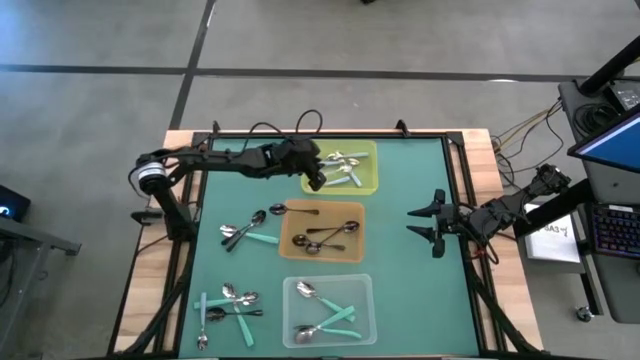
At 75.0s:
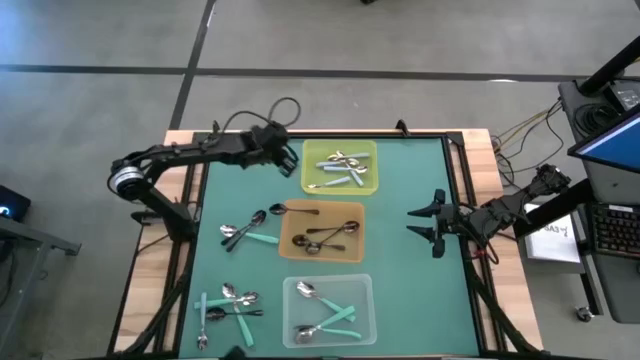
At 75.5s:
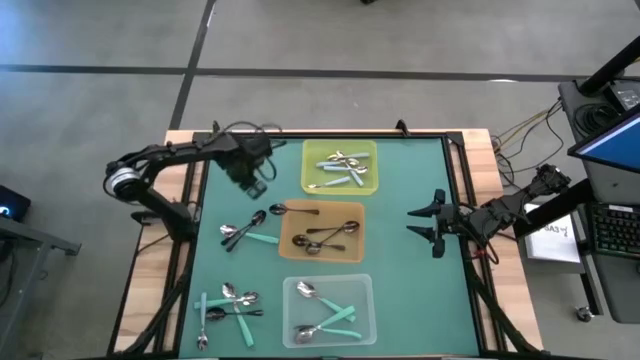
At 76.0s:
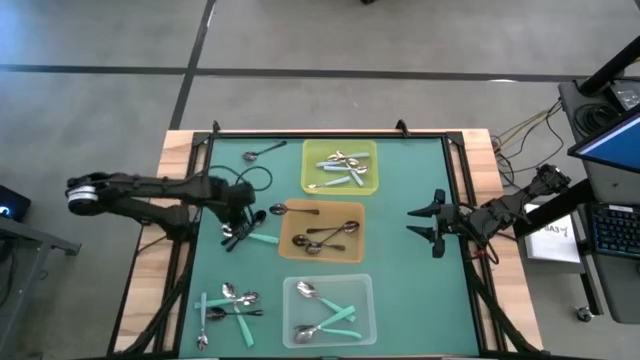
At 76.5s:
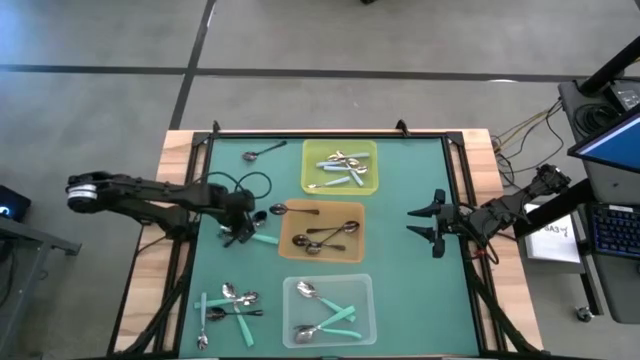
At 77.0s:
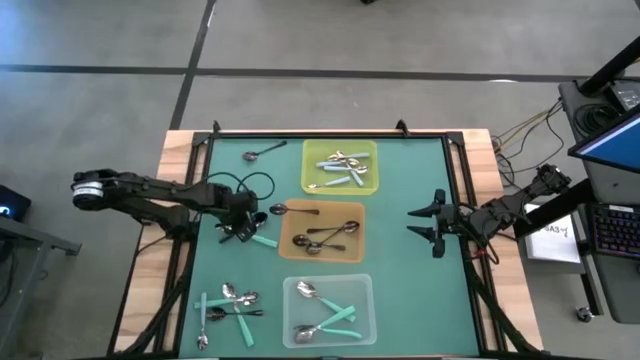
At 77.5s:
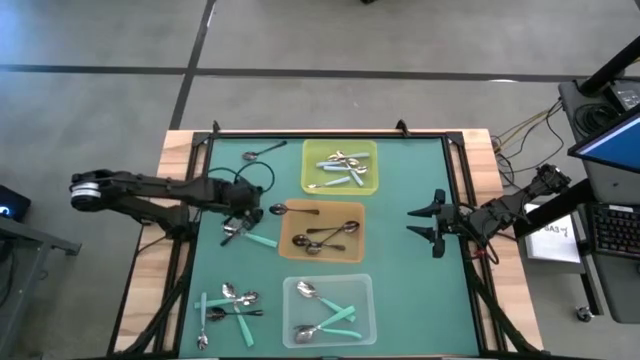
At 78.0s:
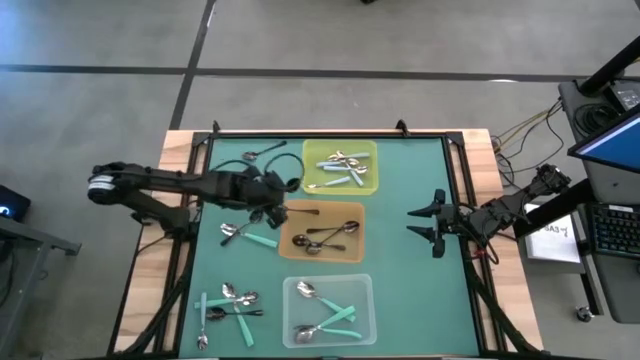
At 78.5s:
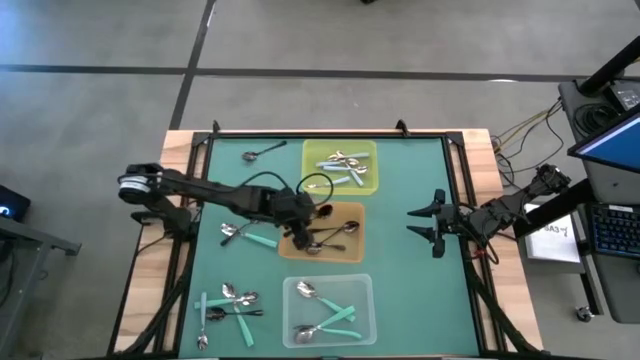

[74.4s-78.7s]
Task: Sort silverware by color (type)
Put the black spoon into the orange bin

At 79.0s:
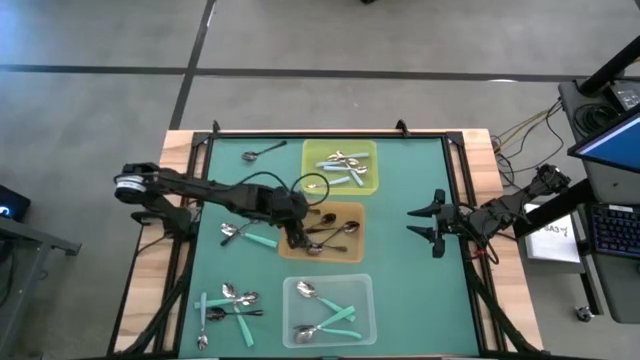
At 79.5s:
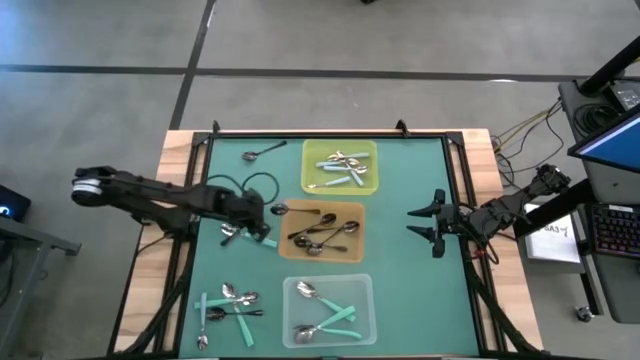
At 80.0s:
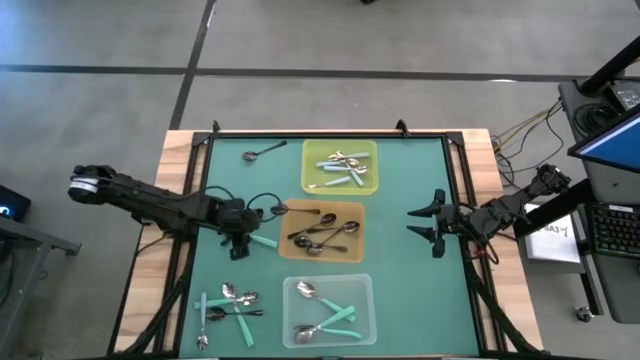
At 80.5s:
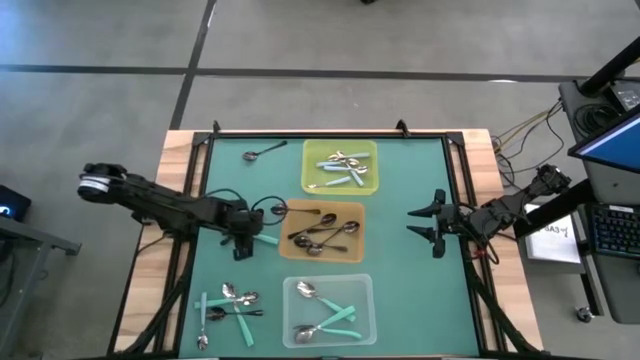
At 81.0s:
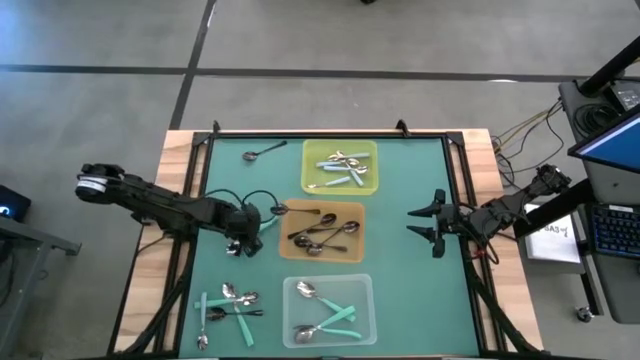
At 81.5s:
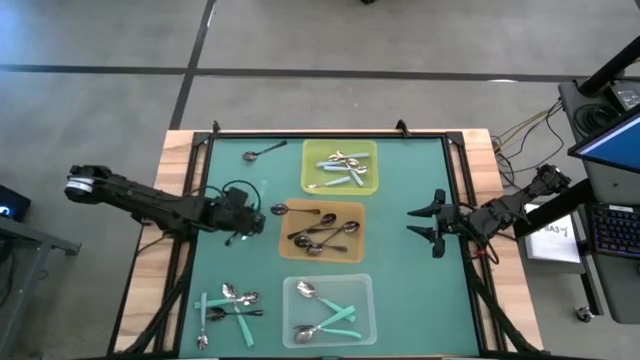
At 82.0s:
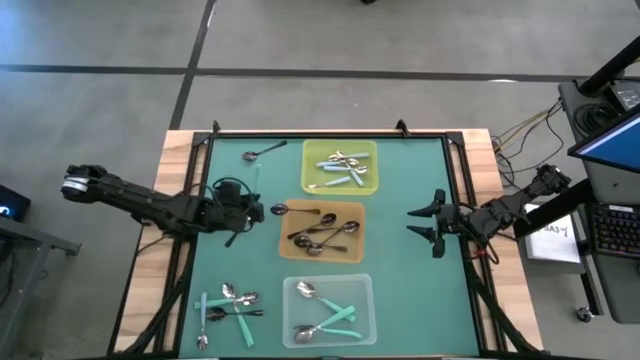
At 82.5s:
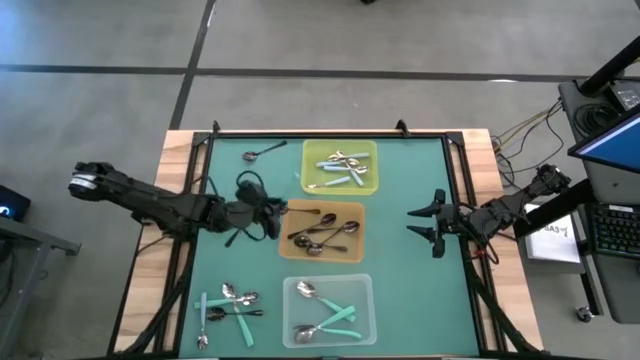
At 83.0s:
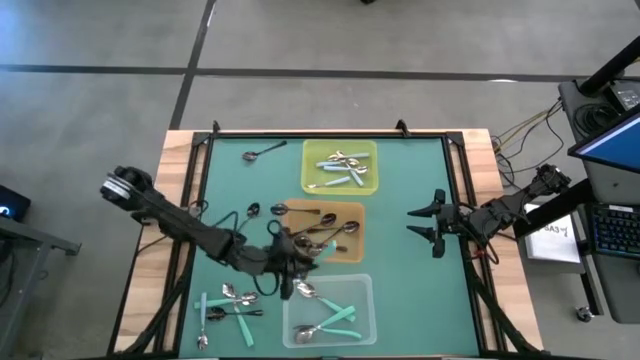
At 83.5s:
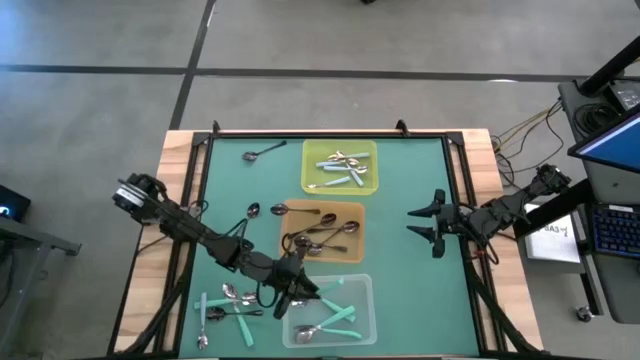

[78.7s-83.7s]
Put the green spoon into the transparent bin

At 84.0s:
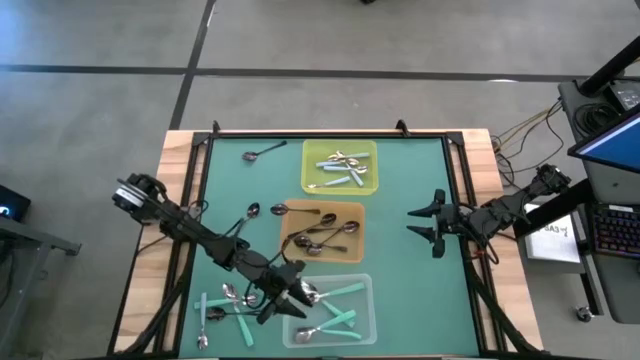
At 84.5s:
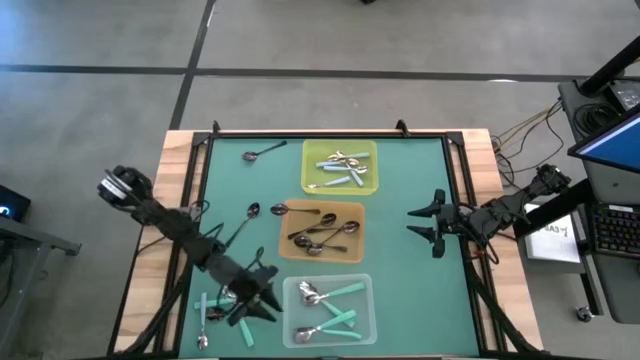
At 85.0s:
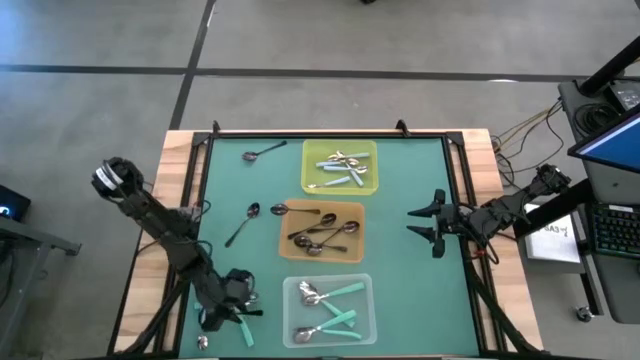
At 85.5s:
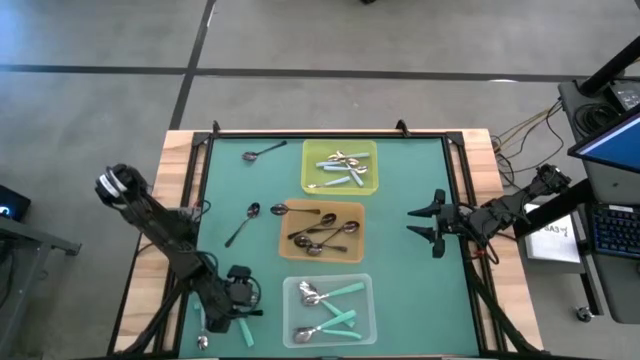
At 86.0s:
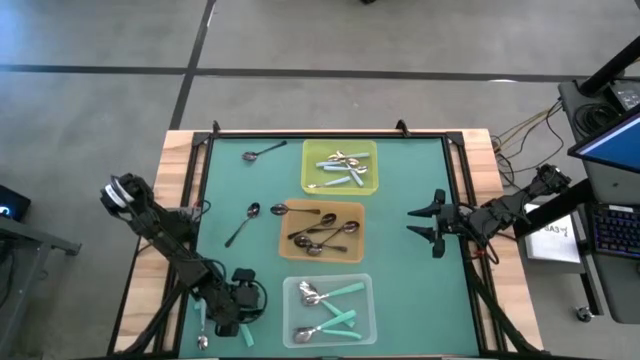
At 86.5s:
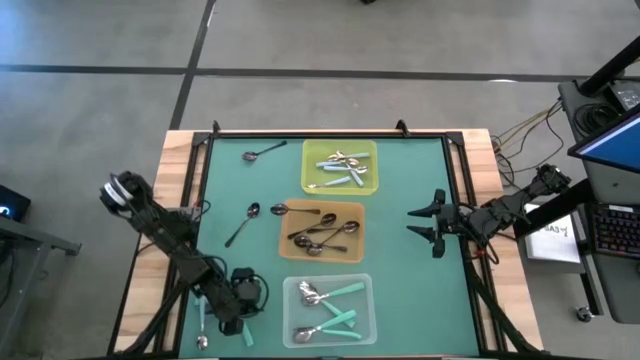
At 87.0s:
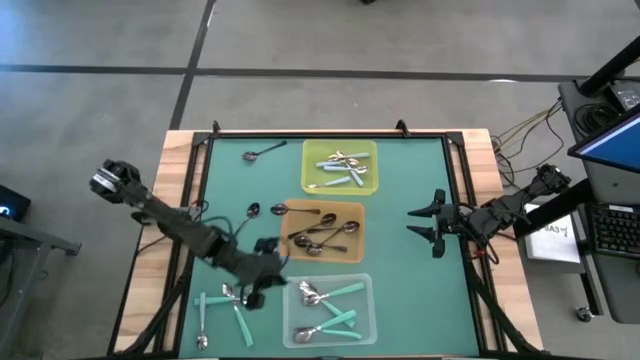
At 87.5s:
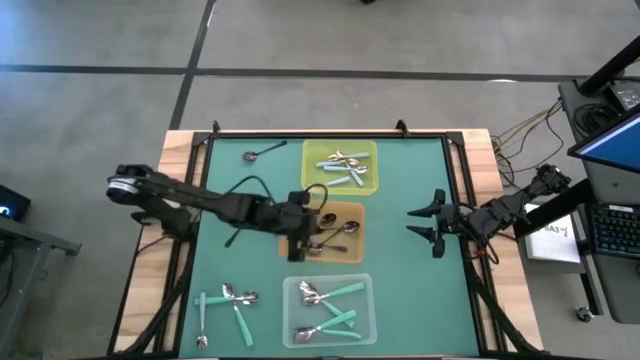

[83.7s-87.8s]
Put the black spoon into the orange bin

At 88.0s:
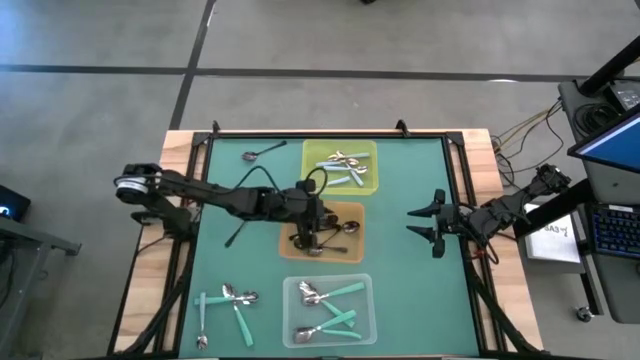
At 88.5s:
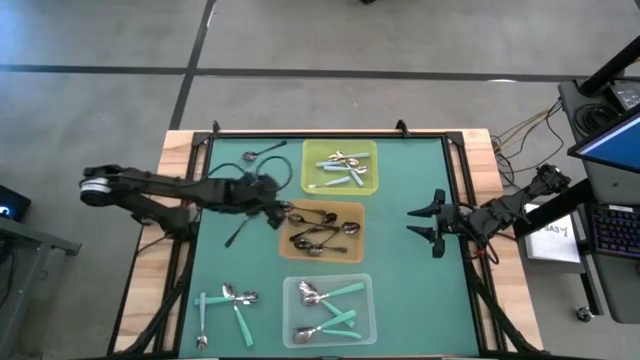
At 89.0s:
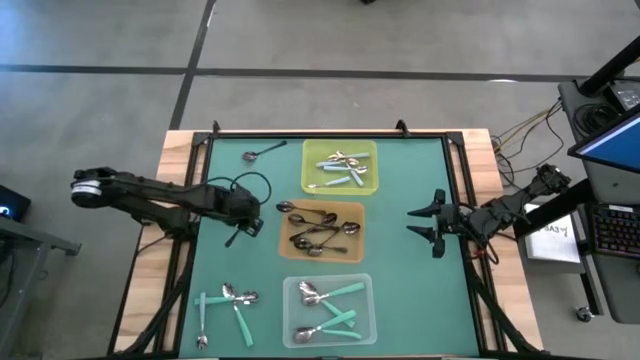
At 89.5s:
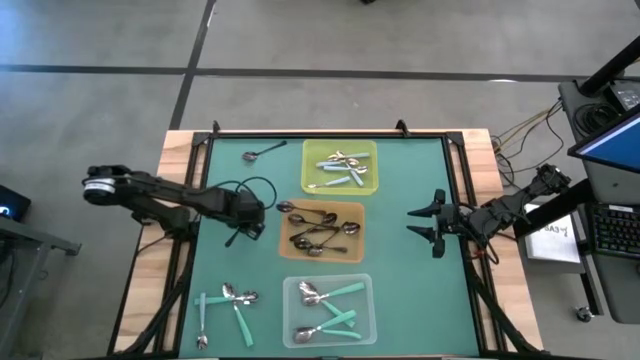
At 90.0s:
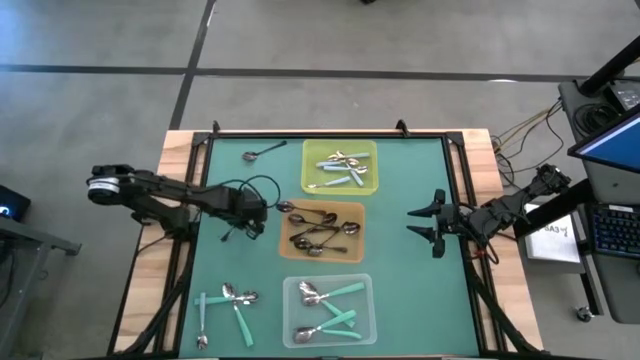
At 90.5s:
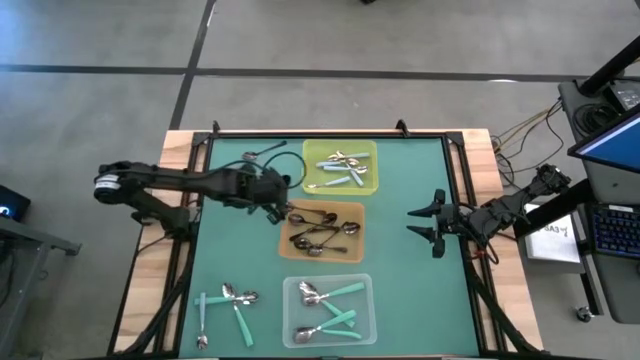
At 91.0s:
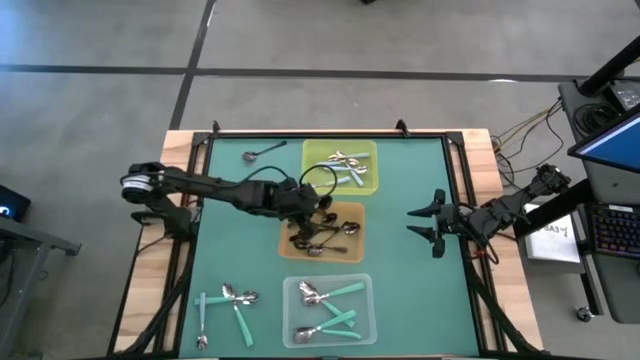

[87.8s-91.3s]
Put the black spoon into the orange bin

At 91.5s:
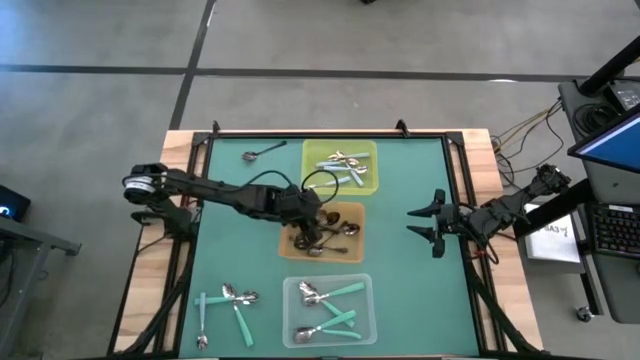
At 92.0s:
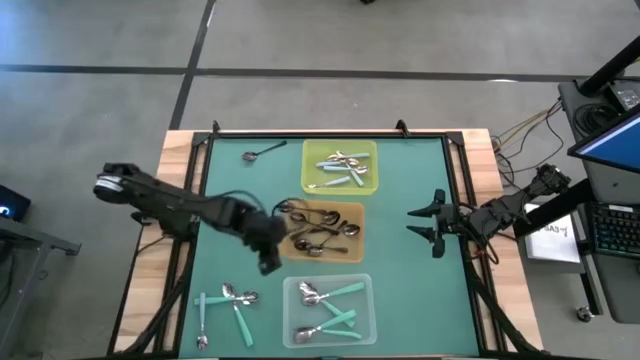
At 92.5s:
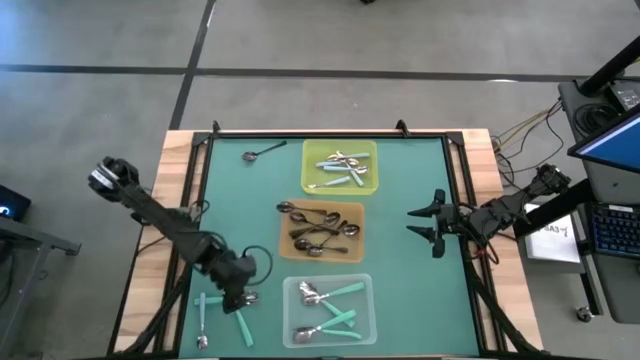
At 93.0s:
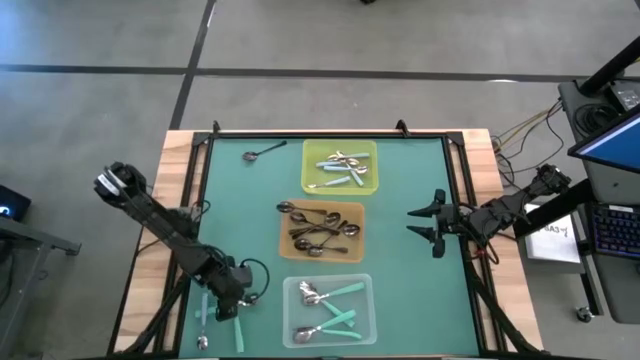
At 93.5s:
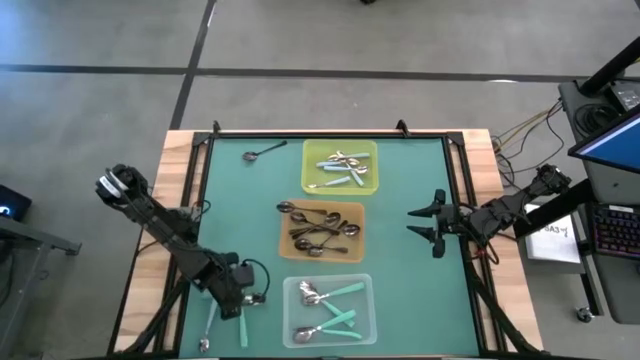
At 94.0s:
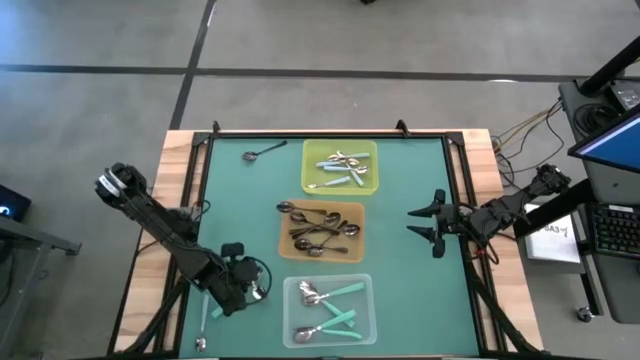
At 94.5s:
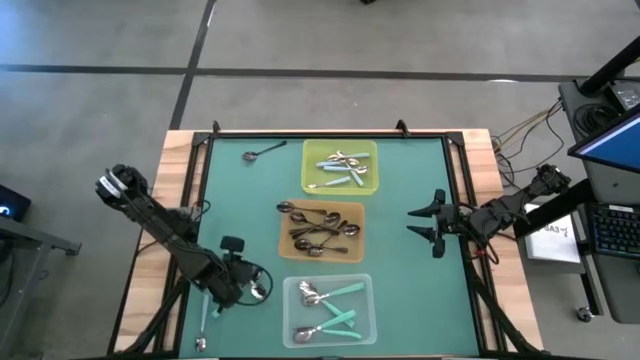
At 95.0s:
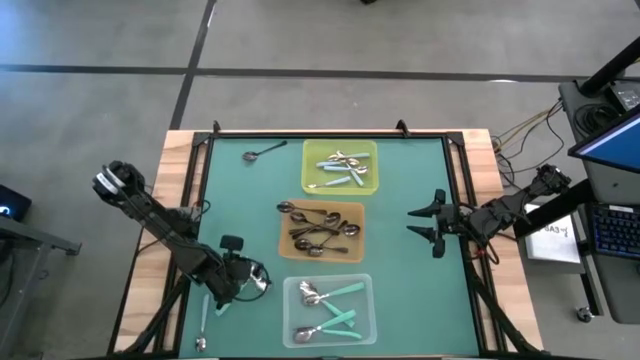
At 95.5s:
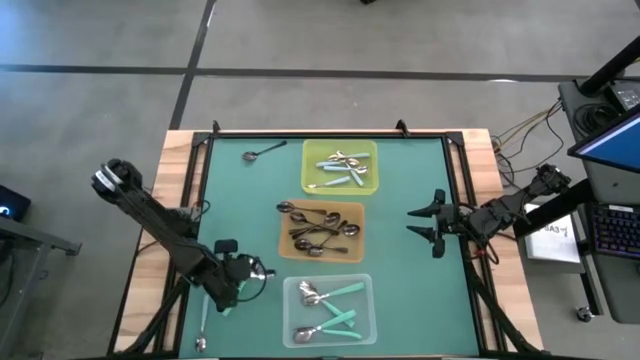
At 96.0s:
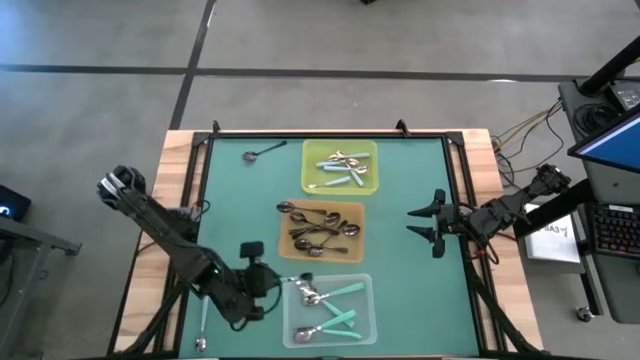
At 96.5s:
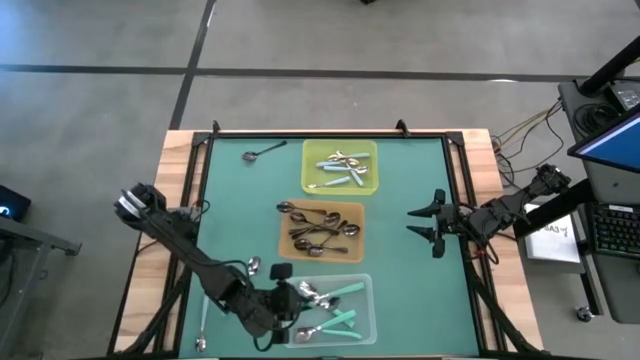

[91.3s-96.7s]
Put the green spoon into the transparent bin
